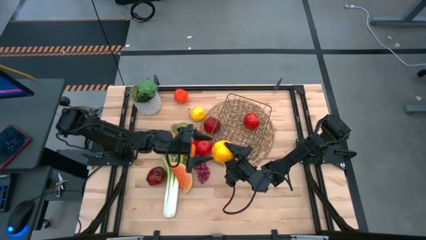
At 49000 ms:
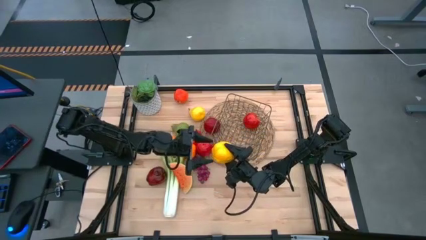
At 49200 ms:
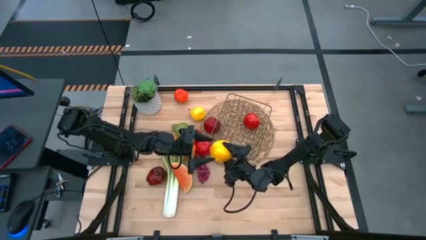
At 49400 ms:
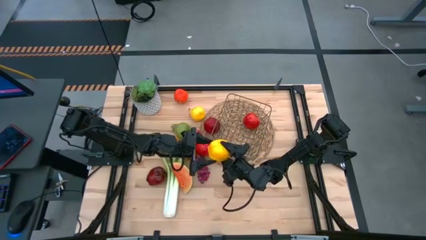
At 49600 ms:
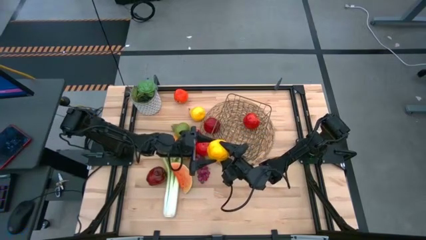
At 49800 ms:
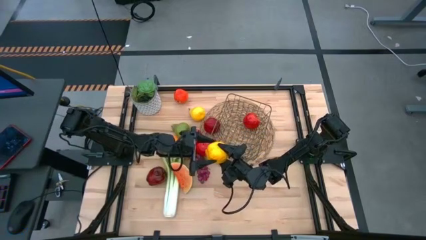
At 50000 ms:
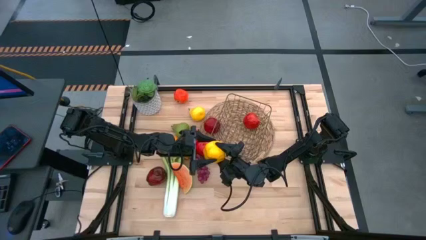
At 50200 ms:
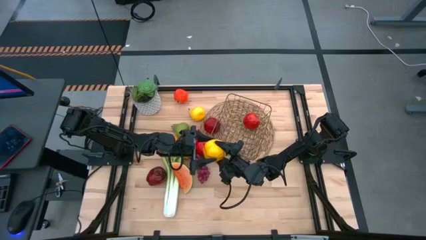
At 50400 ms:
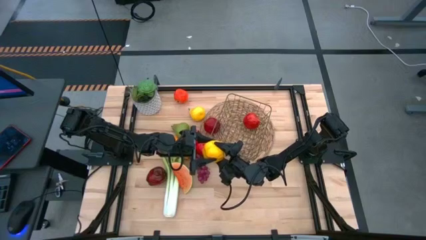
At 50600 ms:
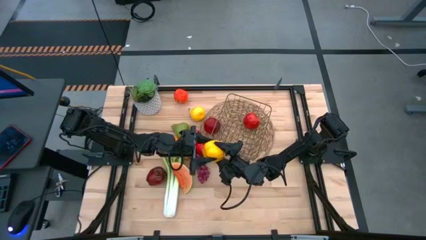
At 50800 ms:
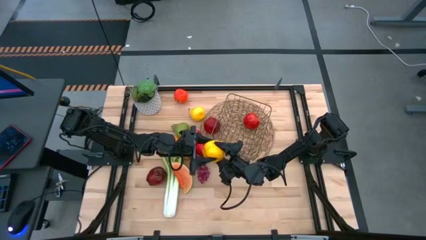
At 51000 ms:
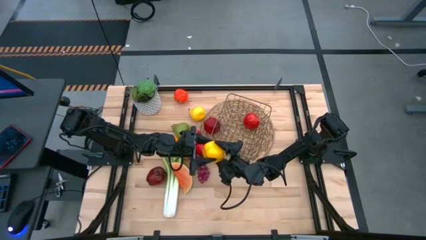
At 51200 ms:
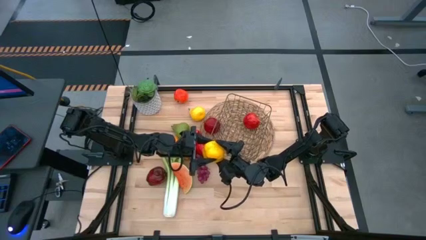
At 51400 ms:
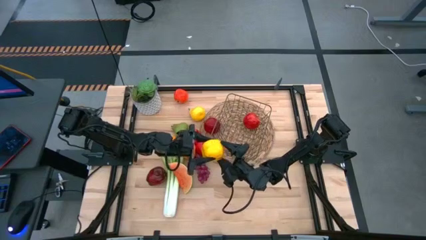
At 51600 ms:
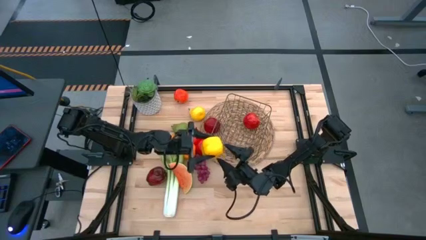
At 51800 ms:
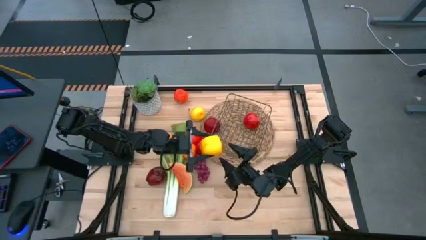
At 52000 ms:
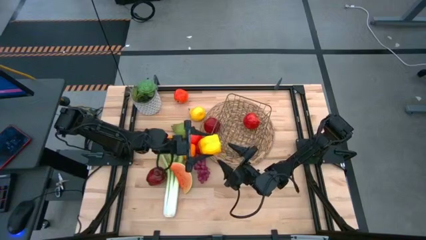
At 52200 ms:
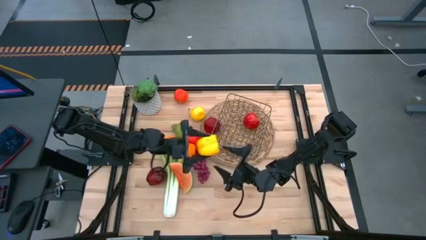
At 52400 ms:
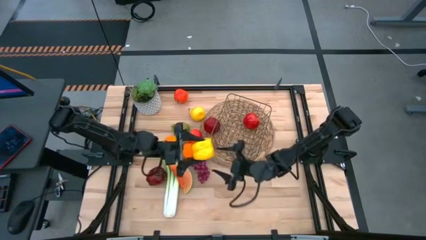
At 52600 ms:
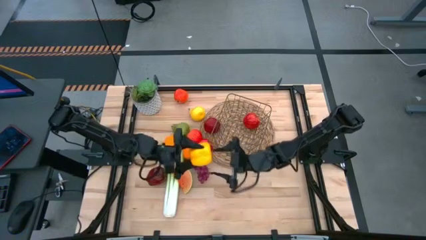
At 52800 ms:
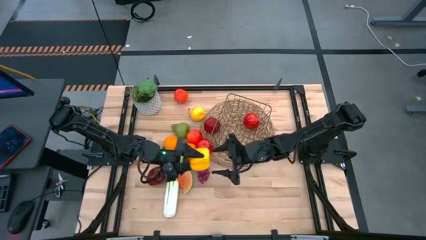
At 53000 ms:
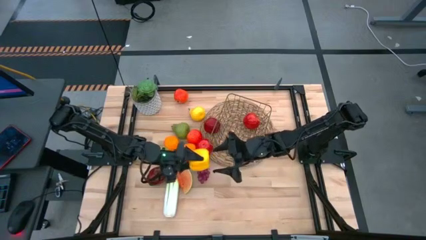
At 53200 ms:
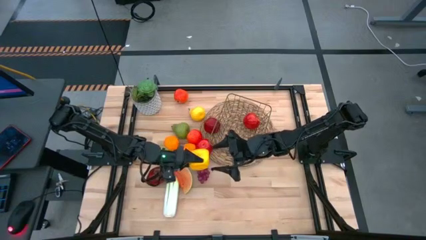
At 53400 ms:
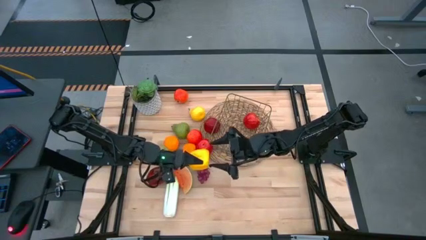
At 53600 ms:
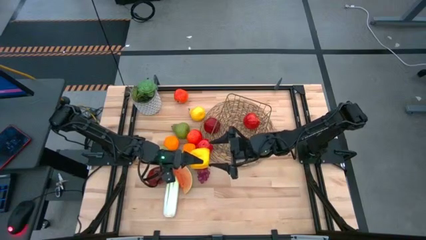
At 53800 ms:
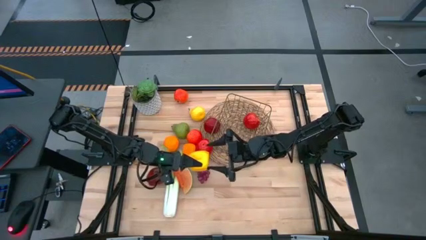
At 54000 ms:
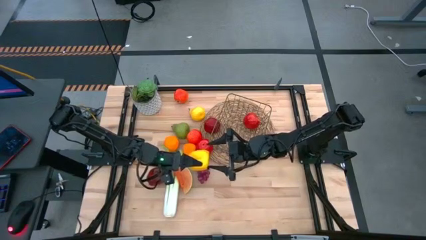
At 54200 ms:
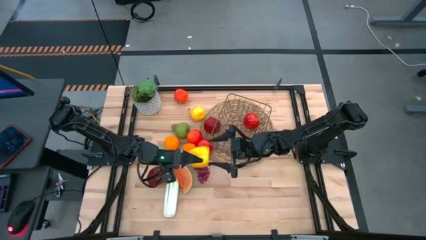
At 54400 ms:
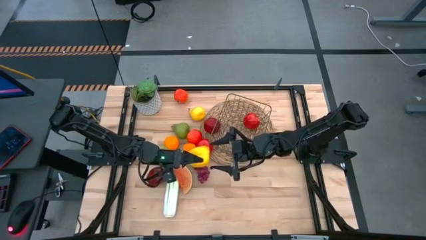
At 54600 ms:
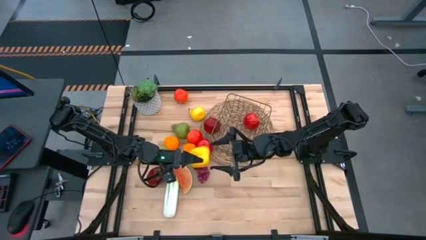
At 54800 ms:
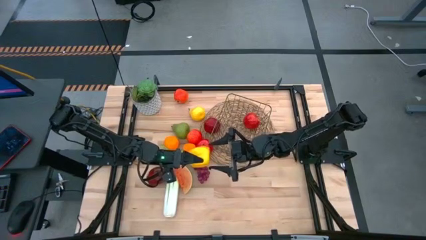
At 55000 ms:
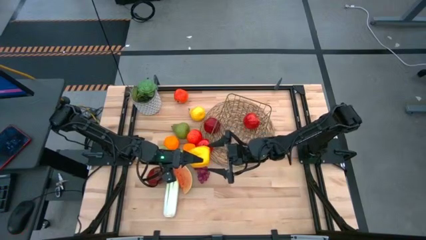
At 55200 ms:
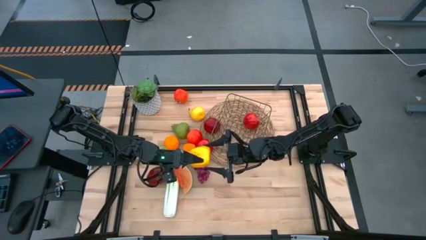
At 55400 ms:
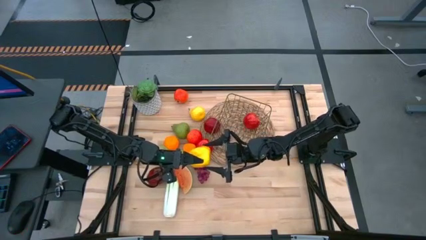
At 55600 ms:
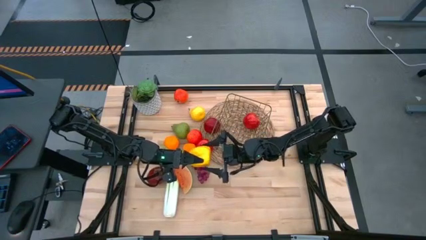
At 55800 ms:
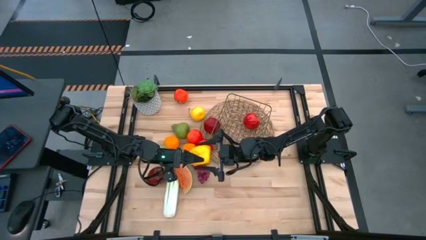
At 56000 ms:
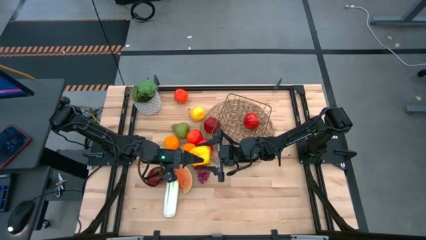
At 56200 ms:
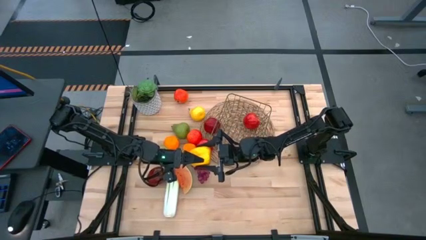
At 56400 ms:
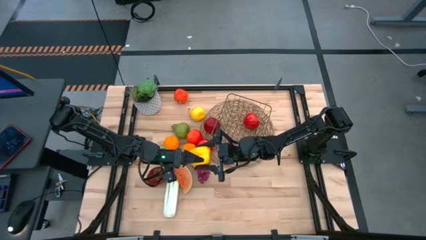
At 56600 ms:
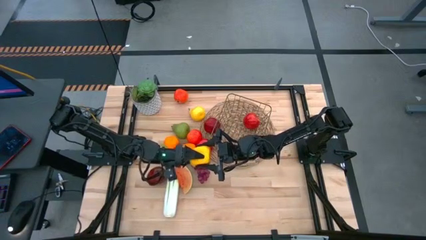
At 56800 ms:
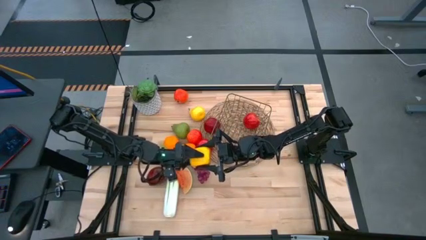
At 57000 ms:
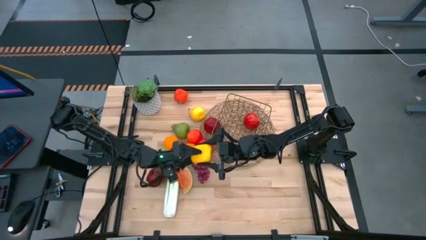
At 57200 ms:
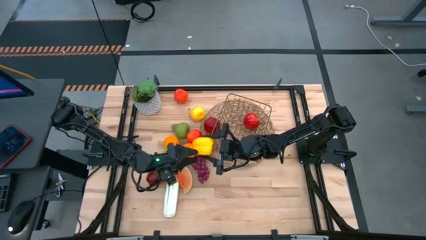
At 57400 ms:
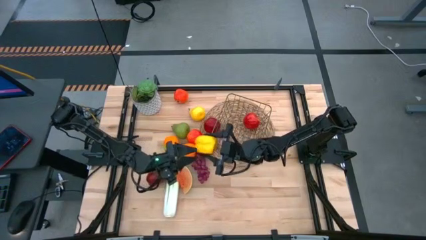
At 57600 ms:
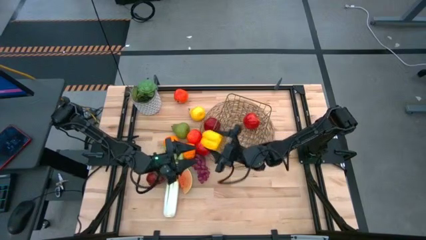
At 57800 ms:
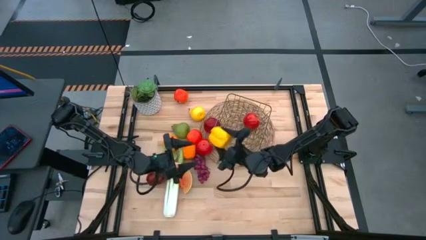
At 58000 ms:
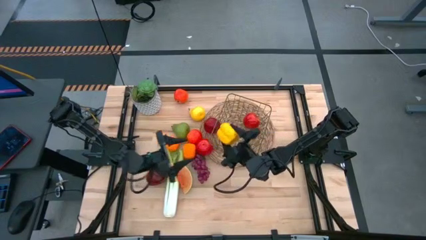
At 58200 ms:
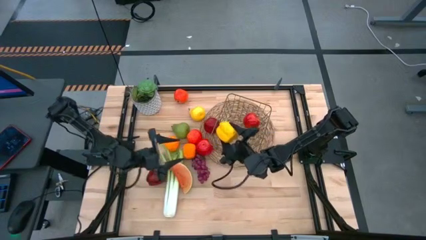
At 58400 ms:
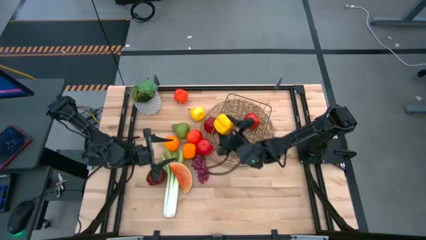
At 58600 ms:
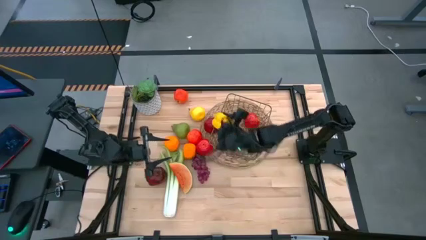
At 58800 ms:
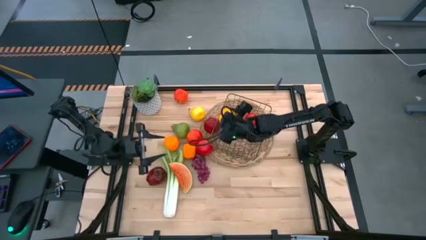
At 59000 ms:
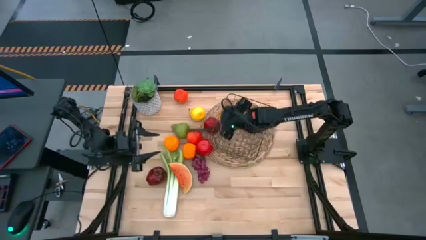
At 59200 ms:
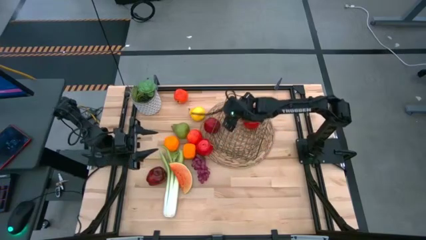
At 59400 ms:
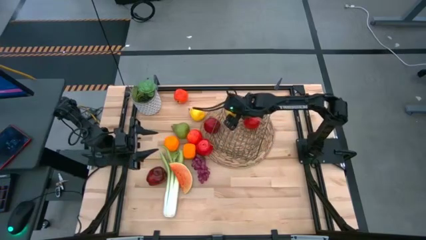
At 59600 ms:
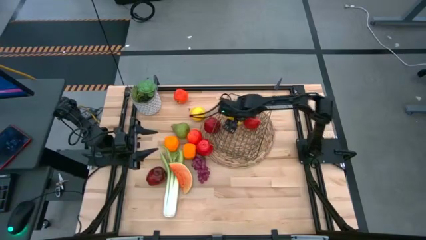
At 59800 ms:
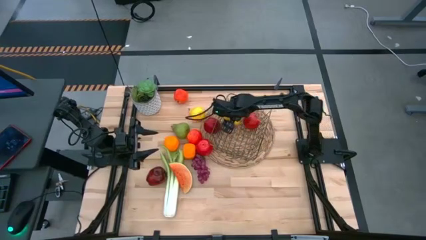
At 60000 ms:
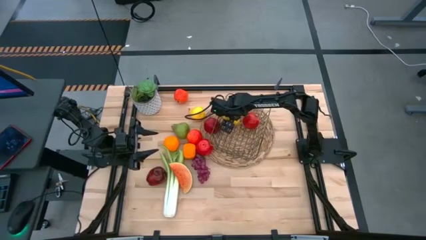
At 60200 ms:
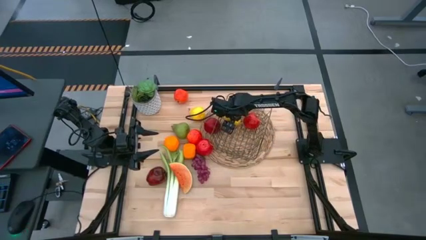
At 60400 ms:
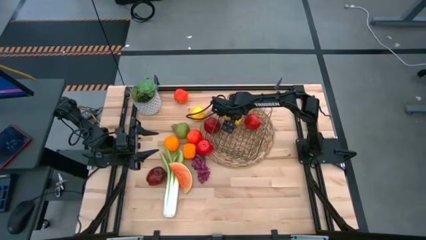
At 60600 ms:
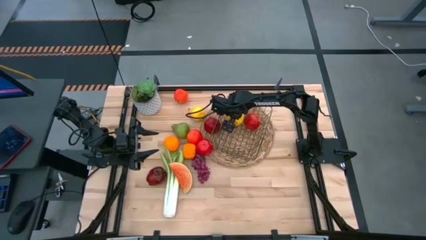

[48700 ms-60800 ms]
Task: Build produce basket
Put the yellow bell pepper into the gold wire basket

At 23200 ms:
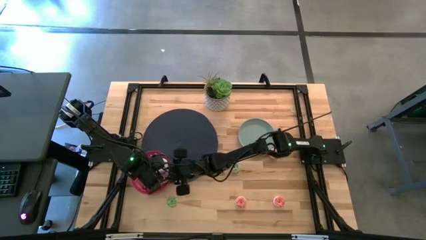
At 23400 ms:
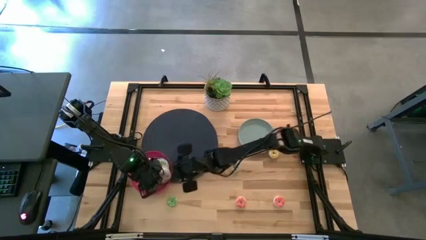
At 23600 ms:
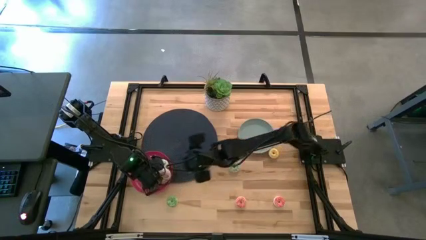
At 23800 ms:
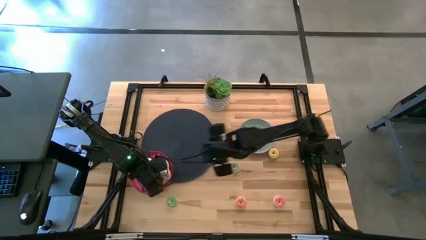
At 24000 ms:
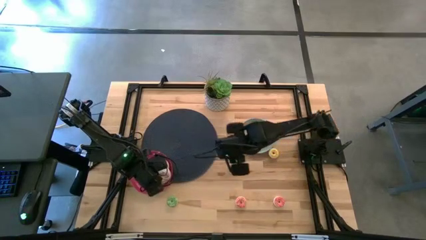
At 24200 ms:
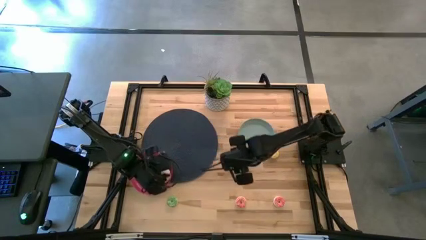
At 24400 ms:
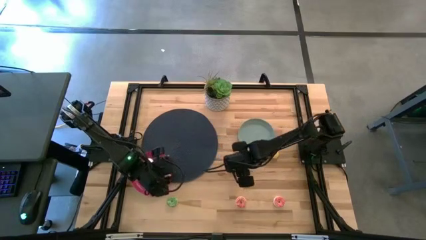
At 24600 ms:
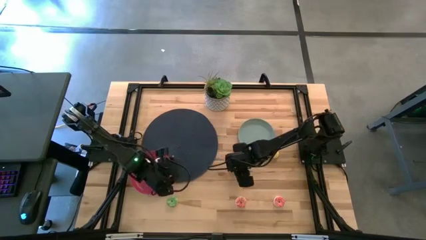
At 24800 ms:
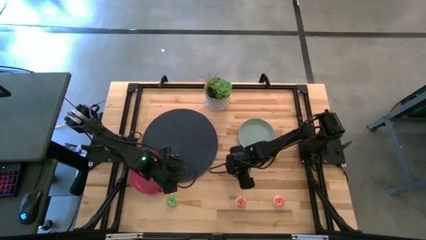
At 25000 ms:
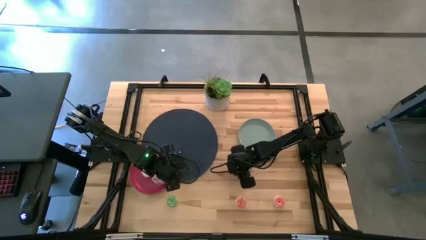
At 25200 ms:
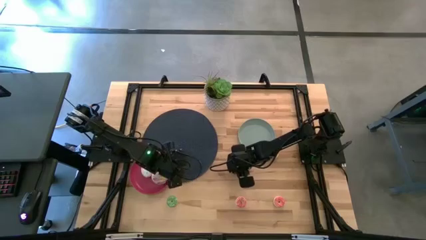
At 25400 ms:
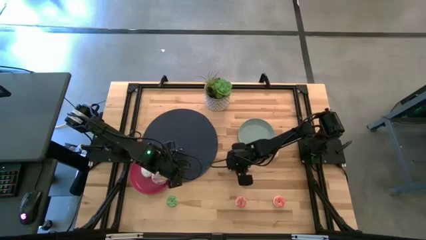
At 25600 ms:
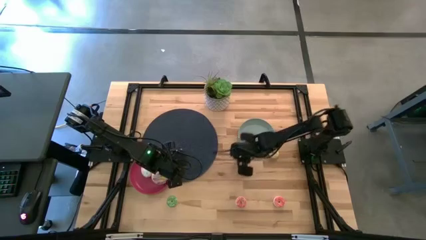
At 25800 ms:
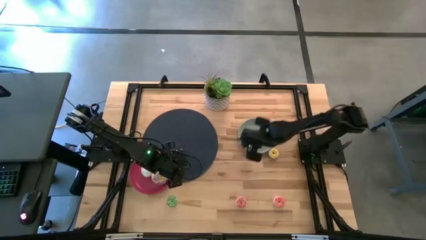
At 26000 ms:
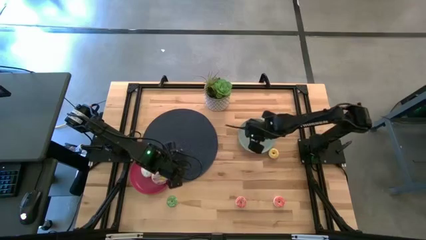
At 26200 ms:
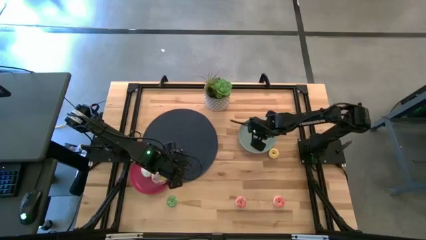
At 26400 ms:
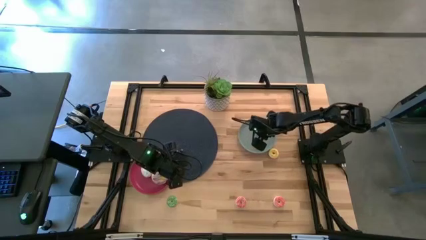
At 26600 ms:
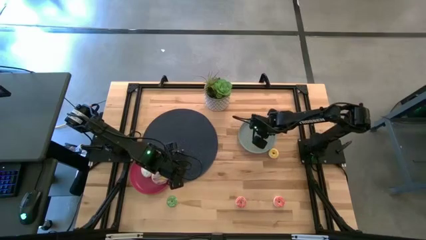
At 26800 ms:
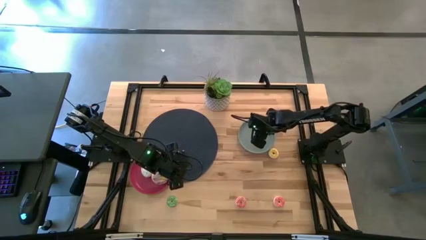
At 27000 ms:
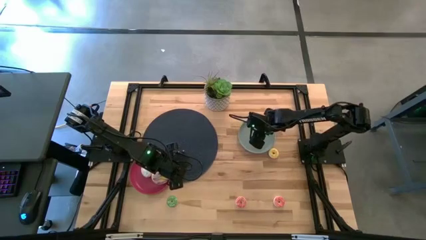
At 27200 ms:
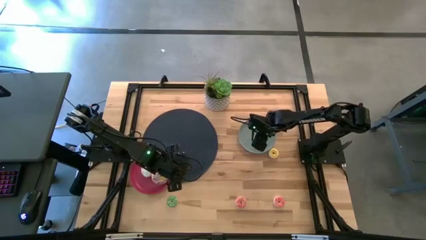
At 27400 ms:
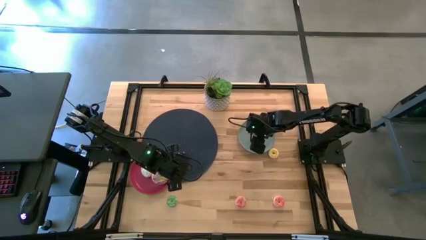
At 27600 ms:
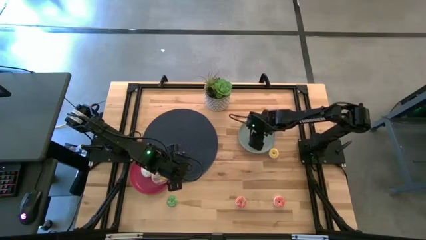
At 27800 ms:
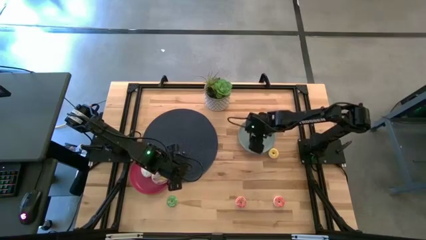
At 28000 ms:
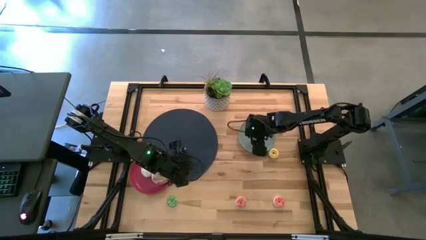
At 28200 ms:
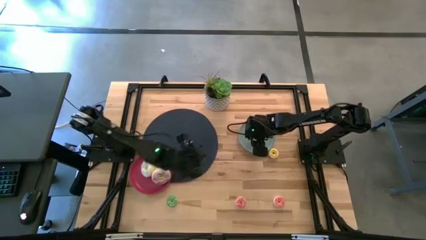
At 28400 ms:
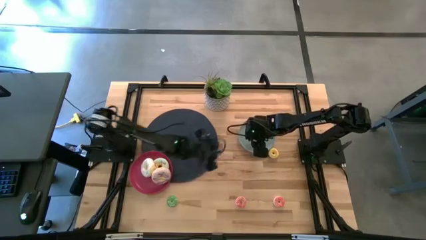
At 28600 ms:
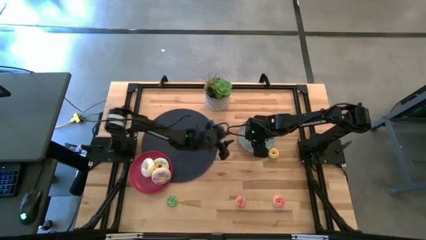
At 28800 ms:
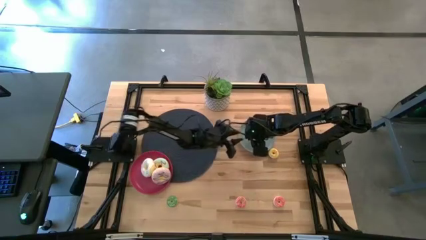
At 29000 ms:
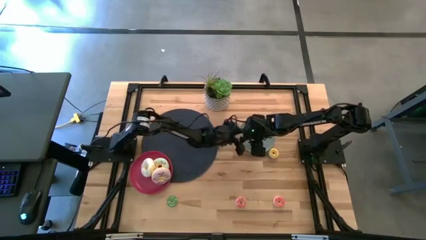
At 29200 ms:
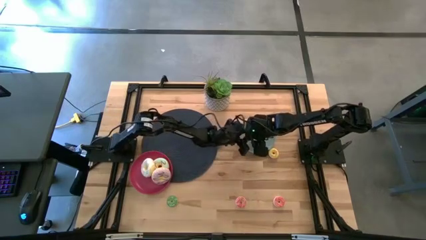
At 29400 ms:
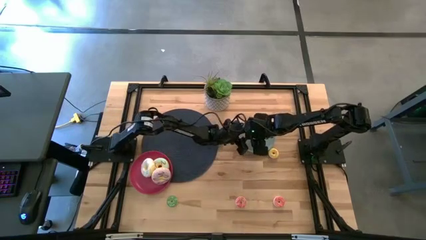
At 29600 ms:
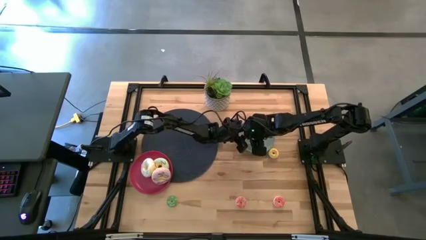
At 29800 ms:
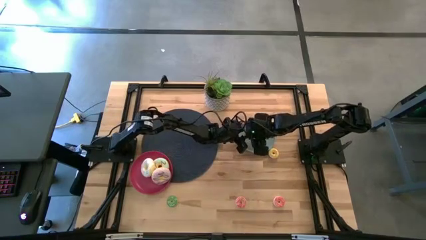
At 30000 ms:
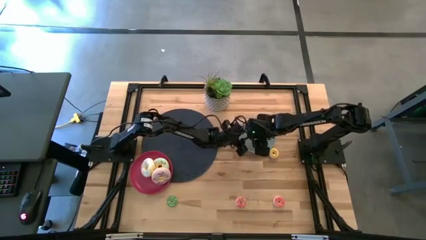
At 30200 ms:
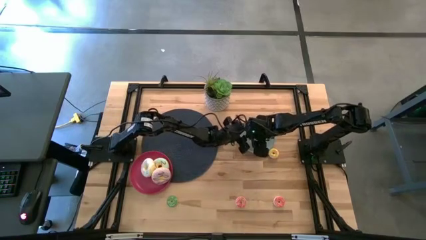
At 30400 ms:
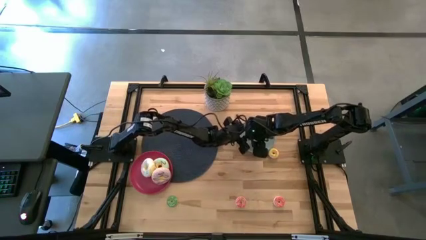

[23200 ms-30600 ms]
Task: Pick & Place donuts
Put the top small green donut on the blue plate
